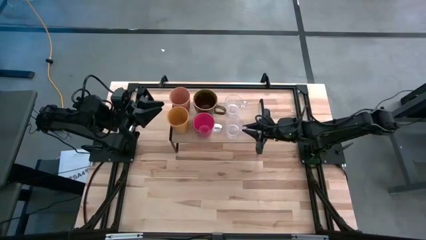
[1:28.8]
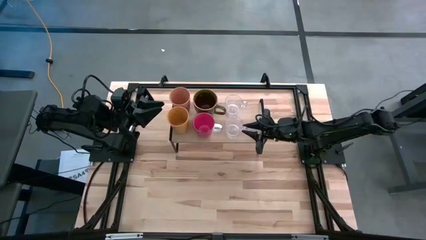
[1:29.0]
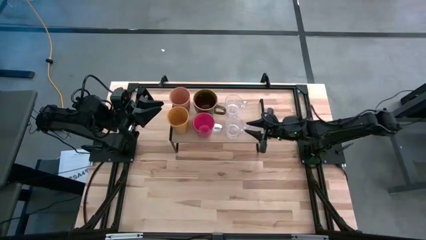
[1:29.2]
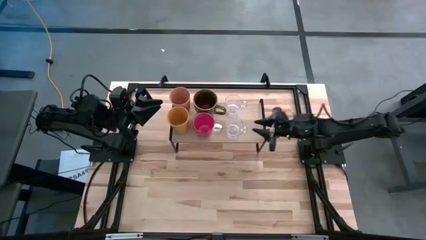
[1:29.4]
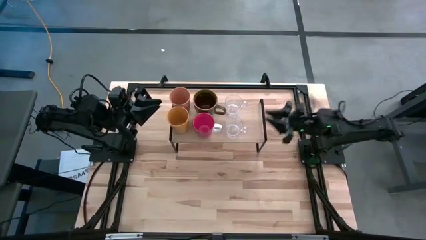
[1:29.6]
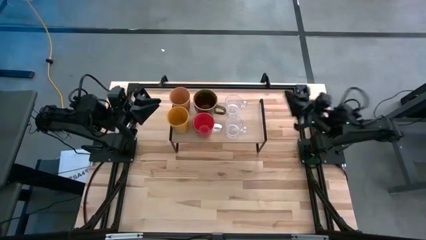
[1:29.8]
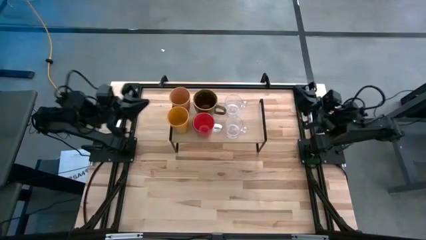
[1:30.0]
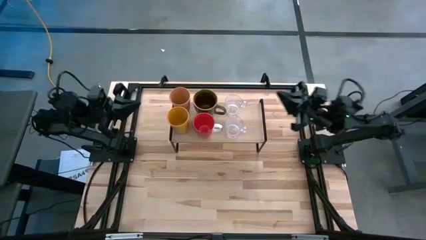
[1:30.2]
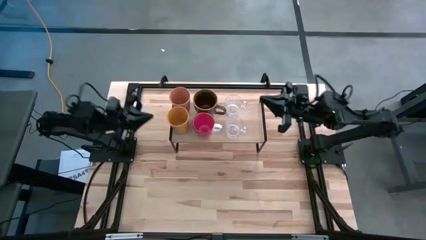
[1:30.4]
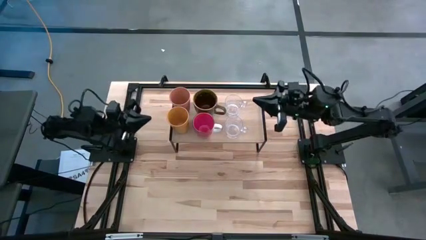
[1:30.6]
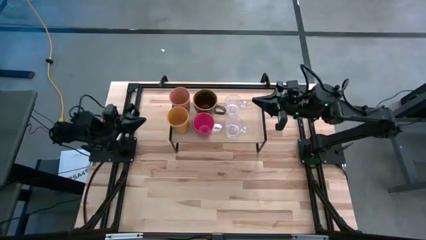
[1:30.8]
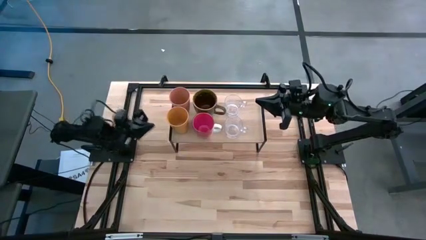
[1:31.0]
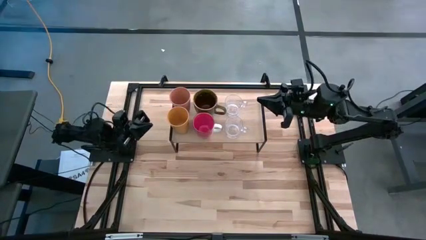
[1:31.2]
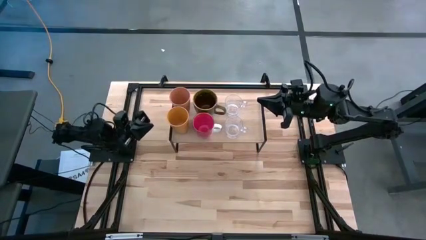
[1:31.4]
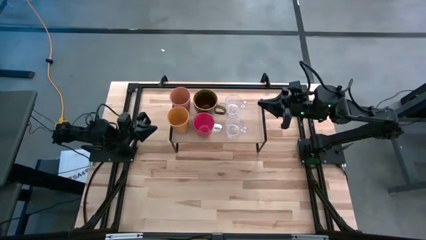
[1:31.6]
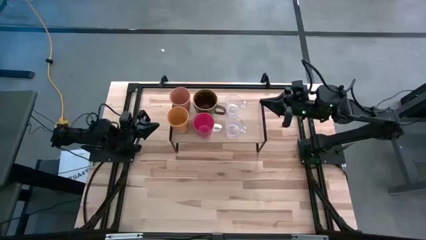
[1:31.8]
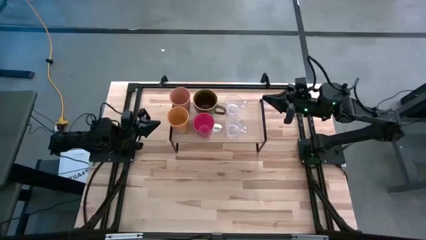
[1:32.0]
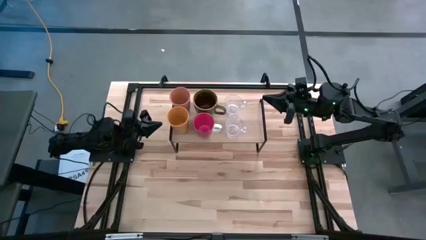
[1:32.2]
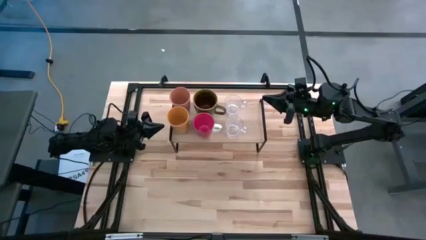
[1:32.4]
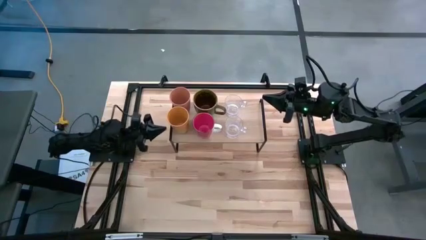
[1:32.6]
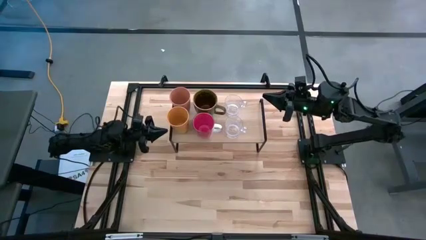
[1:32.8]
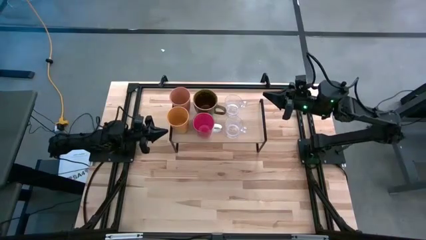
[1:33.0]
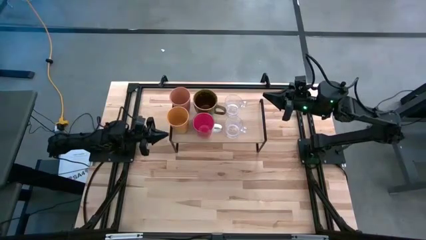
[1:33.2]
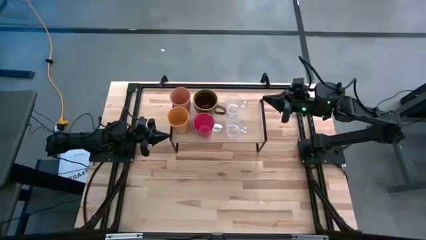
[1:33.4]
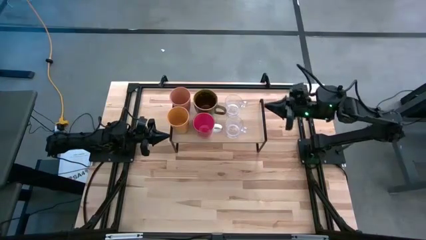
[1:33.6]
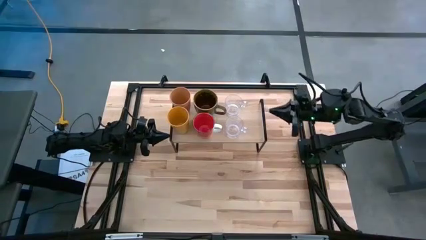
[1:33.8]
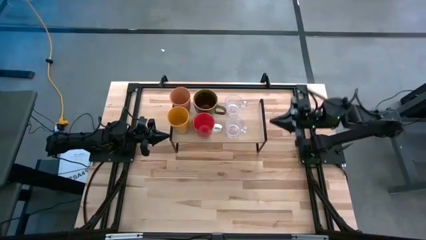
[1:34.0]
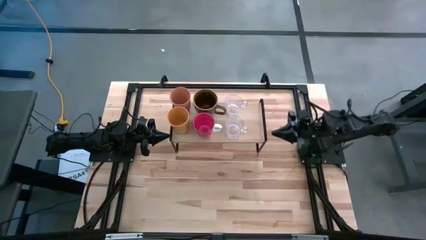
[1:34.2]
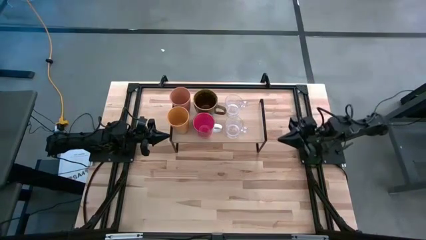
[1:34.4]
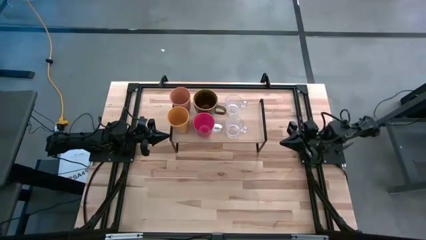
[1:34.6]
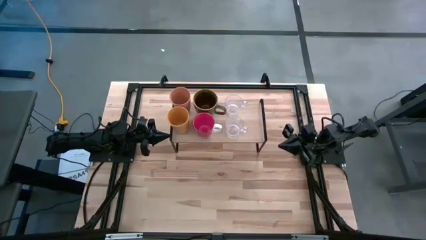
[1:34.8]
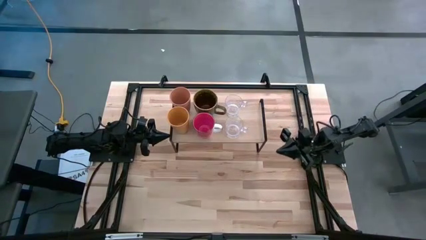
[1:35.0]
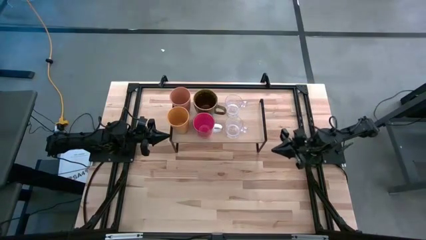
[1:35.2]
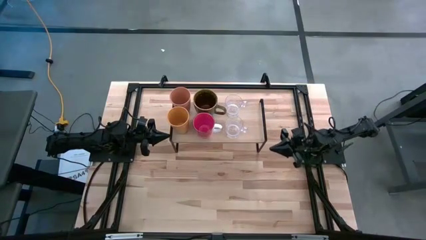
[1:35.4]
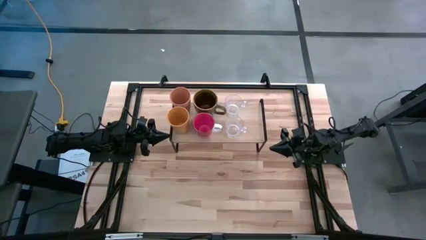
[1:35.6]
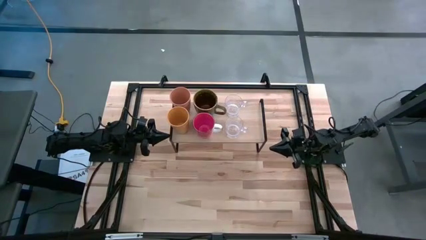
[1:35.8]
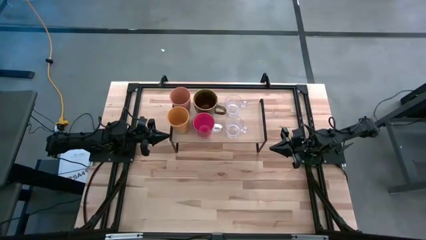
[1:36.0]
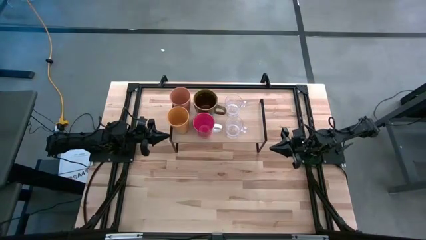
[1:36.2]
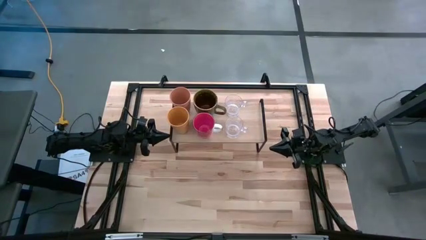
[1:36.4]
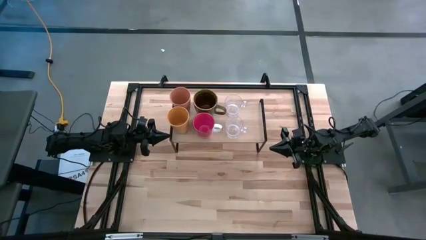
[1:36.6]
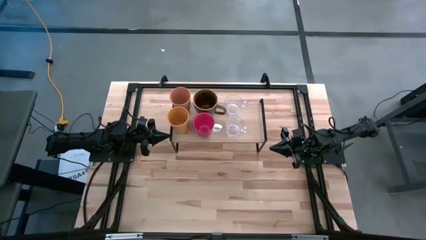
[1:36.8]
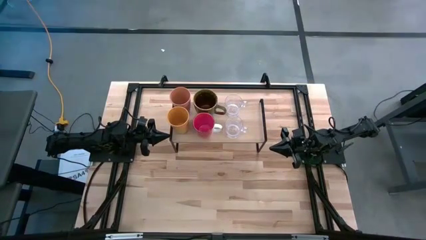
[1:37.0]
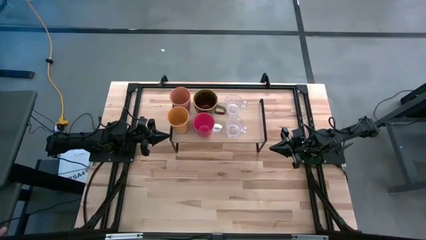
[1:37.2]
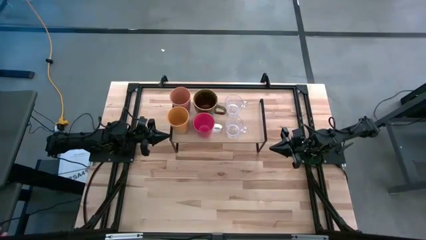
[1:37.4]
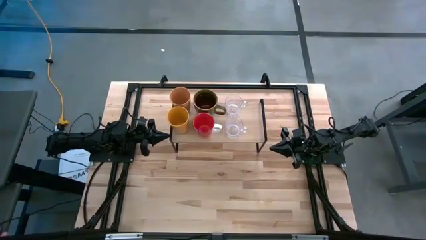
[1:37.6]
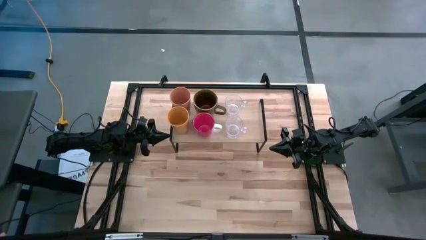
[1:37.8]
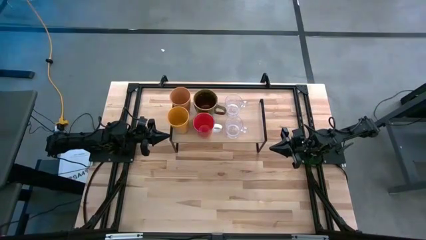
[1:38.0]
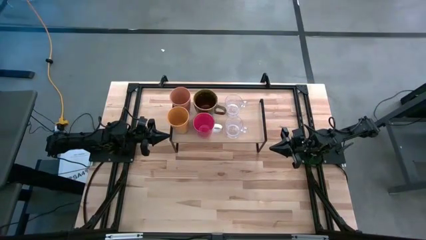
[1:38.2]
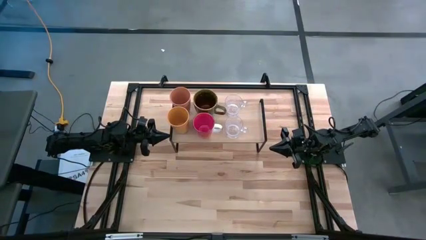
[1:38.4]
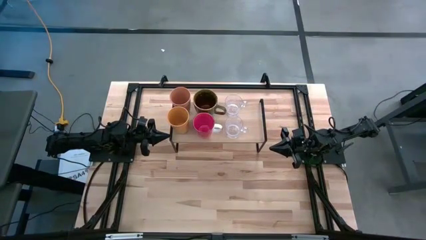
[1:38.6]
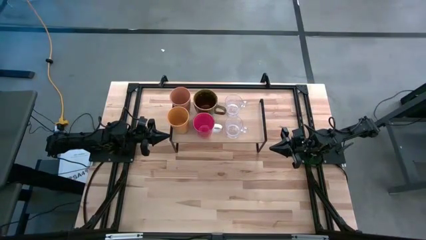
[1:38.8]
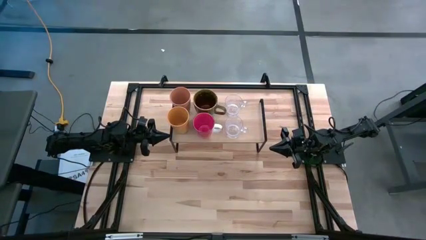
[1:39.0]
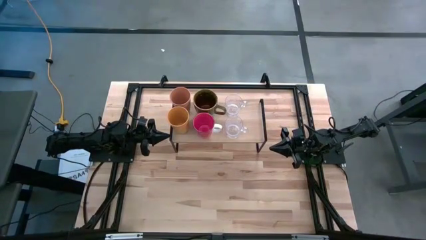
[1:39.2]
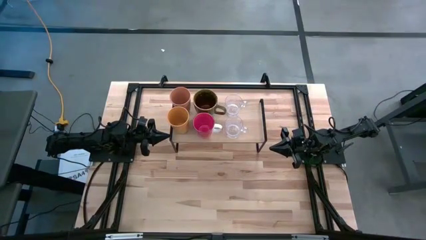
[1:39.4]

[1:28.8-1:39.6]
Task: Stack small to large cups/mugs on shelf
Return to Home Position

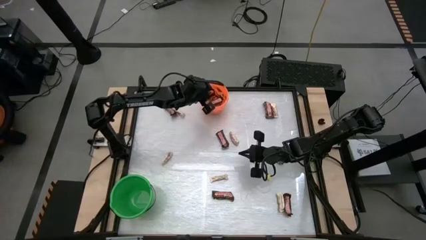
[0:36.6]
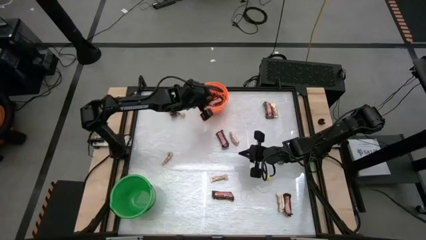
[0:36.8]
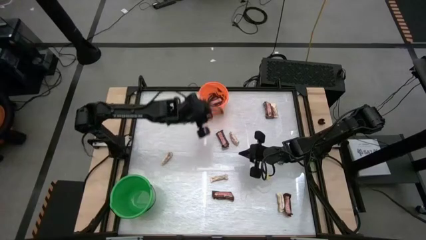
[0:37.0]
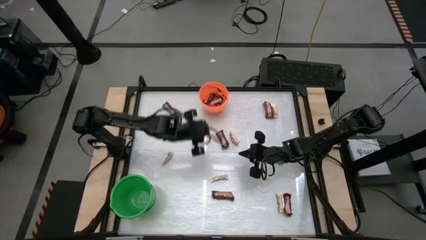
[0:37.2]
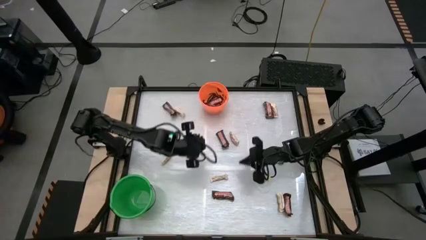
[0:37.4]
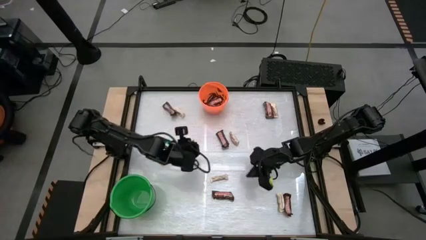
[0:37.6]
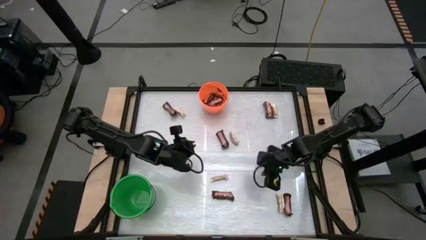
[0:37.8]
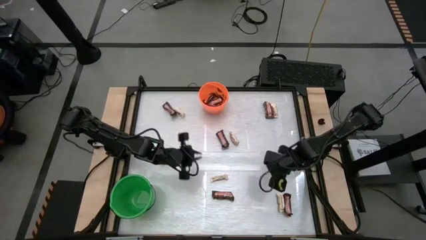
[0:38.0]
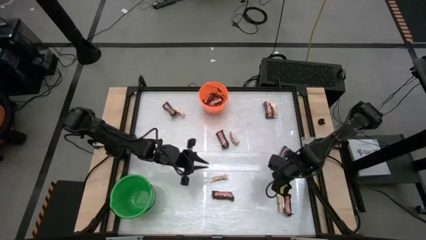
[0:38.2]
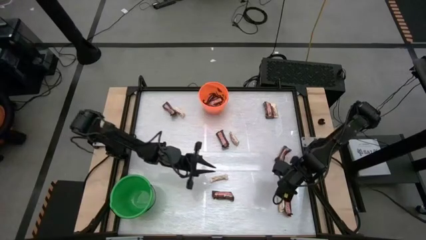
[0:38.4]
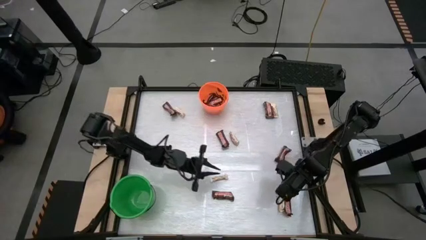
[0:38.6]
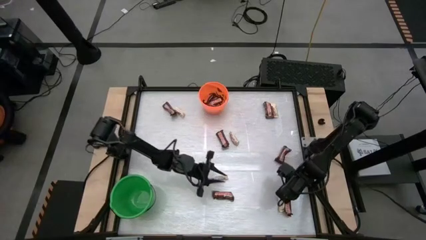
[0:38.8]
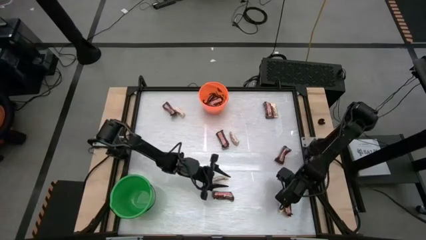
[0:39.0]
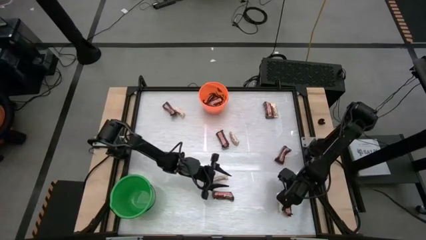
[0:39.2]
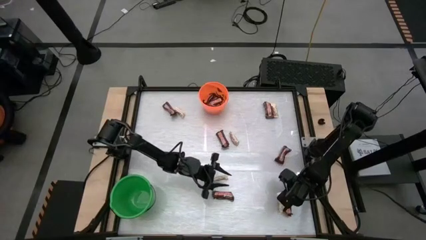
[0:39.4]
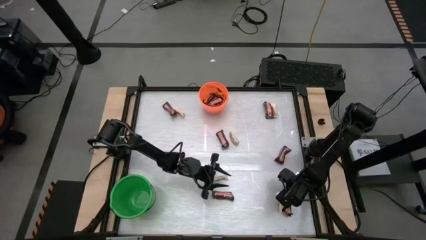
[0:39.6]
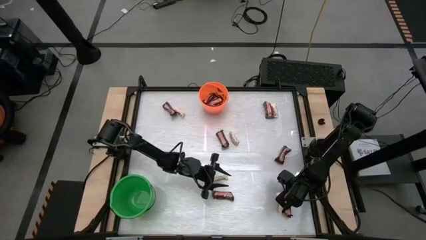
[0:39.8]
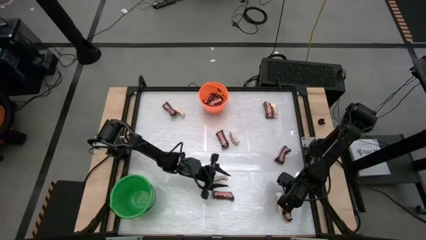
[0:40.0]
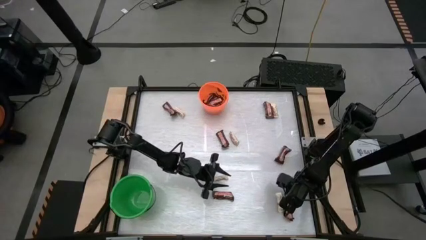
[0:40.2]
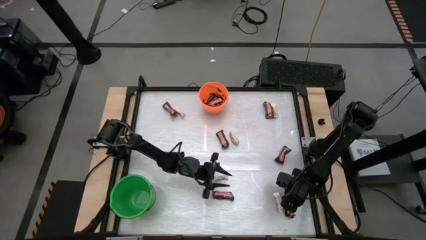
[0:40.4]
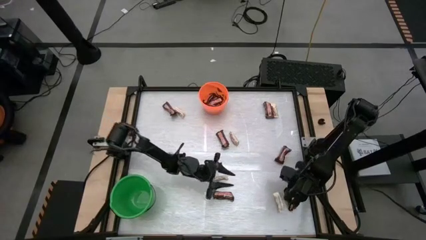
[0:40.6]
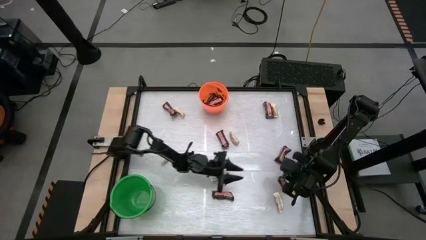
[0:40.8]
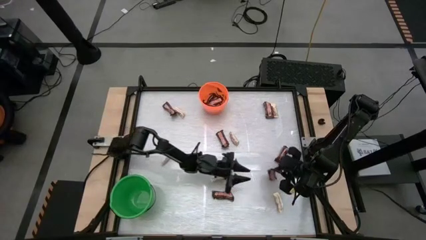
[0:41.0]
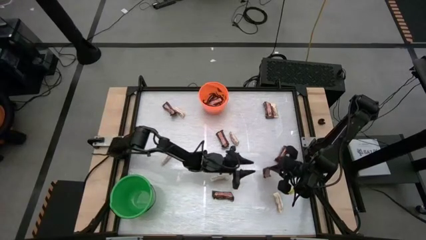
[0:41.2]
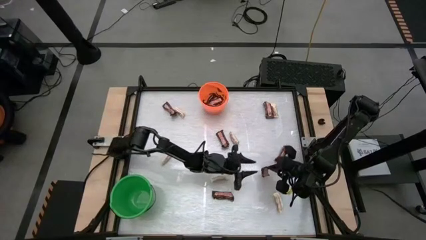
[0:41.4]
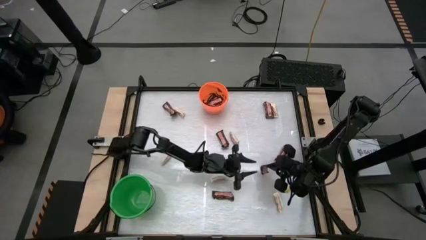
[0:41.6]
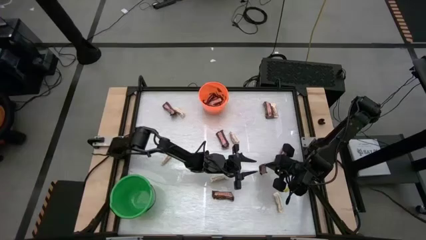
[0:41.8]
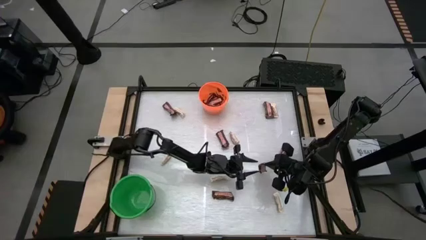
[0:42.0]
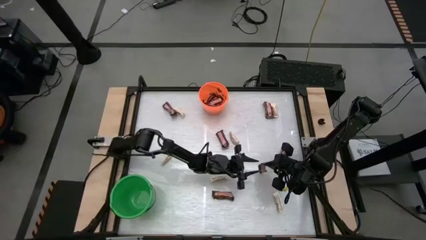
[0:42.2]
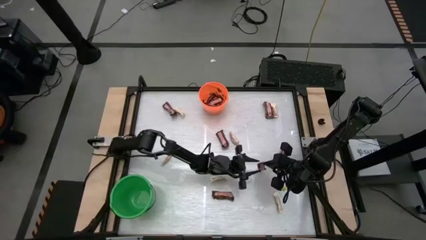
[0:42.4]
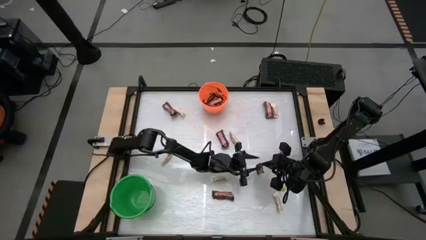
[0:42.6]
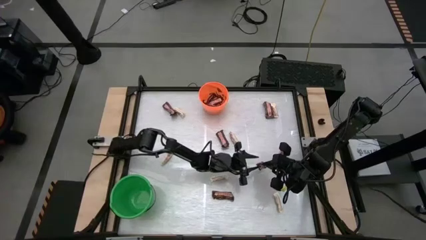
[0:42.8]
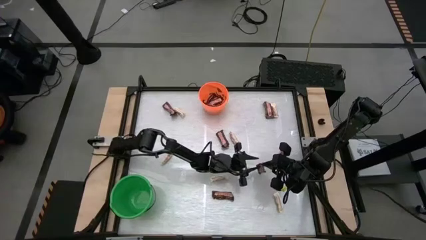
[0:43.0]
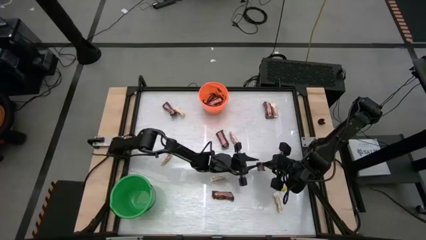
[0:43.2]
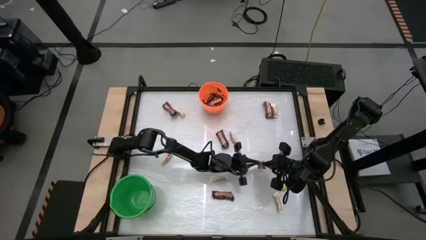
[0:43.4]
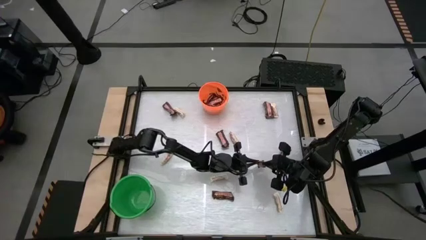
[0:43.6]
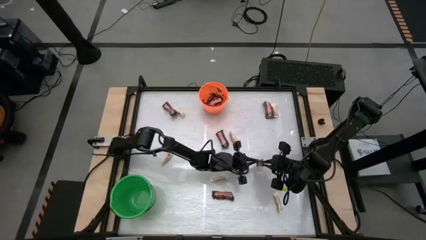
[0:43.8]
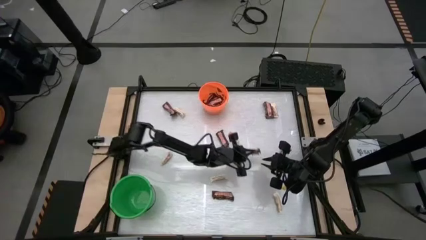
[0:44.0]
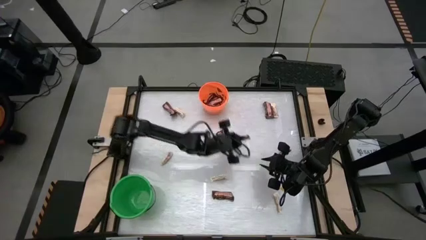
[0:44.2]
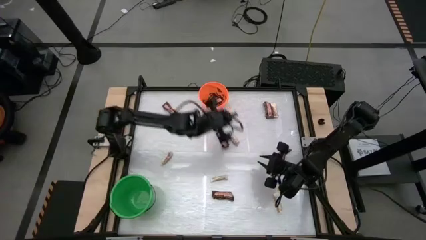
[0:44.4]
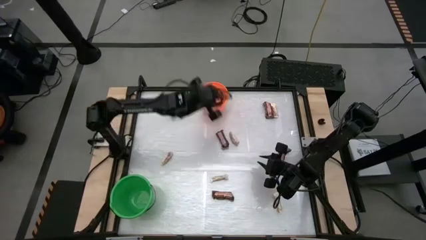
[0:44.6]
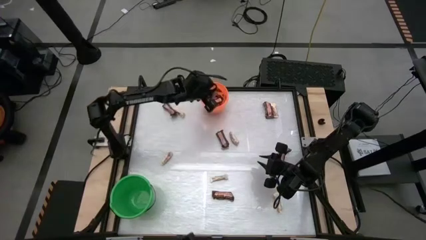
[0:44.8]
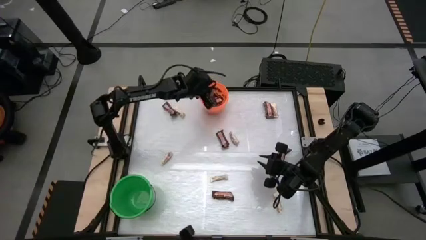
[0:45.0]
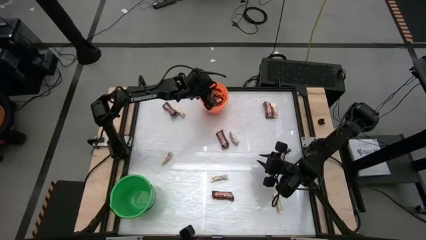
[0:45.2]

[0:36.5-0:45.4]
Task: Sort candy by brand, put in halloween buckets
Put the brown chocolate bar into the orange bucket
